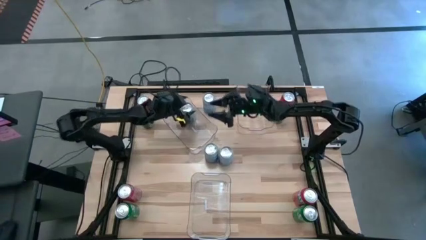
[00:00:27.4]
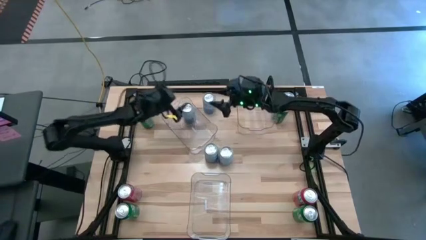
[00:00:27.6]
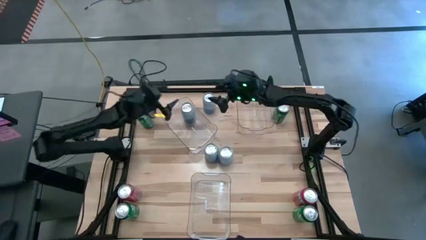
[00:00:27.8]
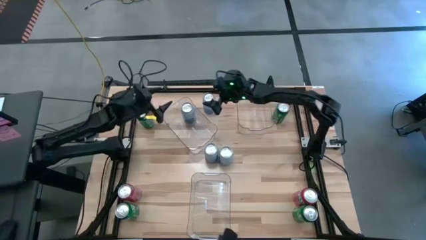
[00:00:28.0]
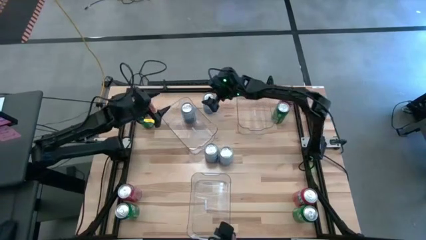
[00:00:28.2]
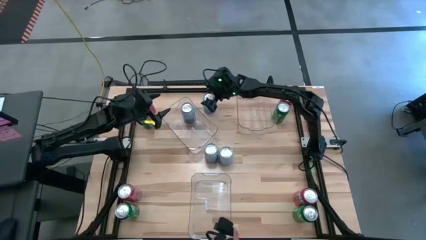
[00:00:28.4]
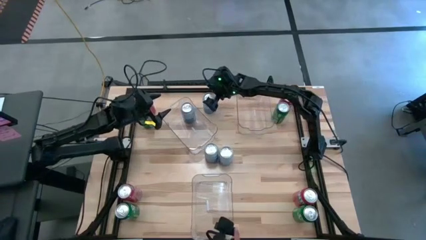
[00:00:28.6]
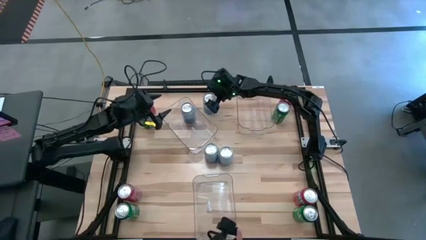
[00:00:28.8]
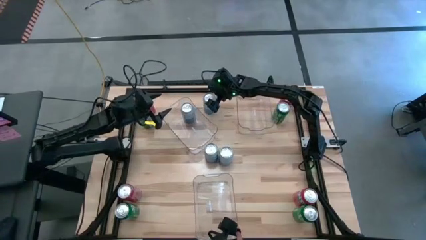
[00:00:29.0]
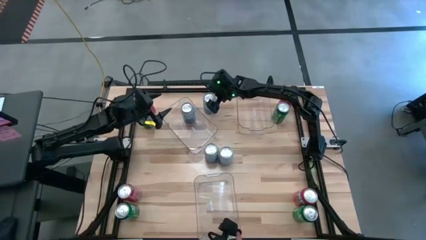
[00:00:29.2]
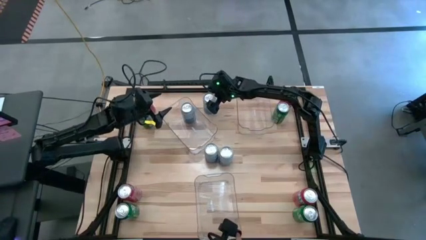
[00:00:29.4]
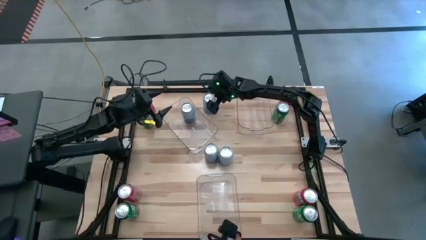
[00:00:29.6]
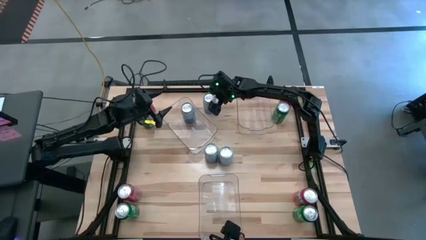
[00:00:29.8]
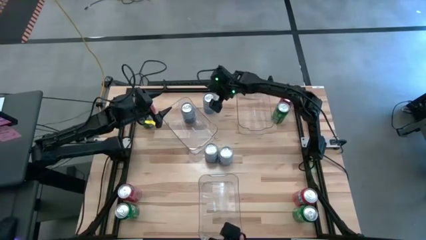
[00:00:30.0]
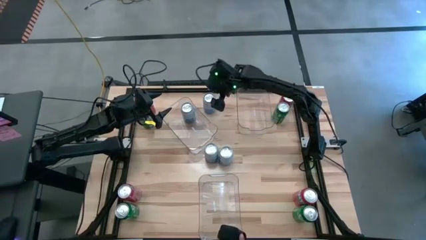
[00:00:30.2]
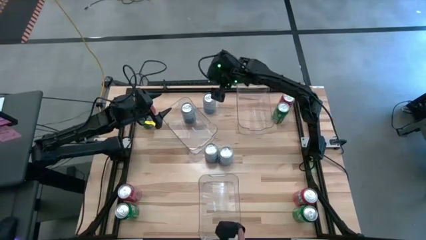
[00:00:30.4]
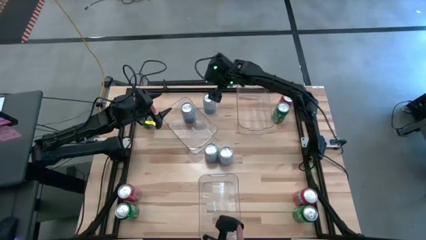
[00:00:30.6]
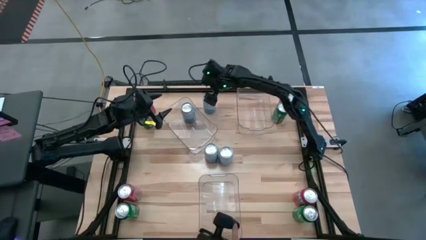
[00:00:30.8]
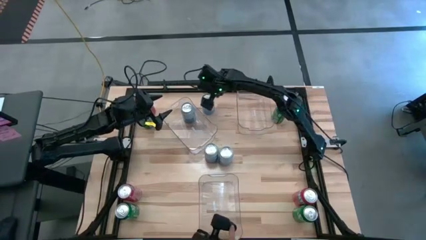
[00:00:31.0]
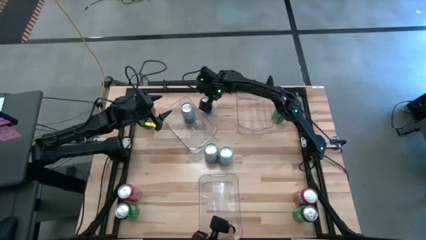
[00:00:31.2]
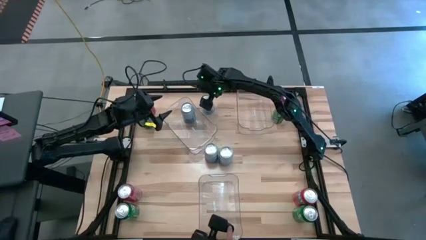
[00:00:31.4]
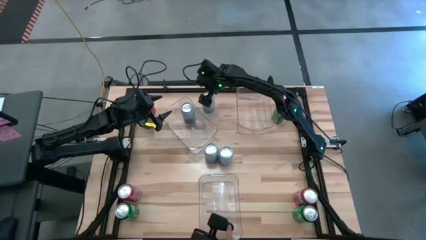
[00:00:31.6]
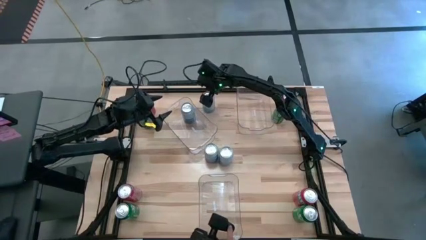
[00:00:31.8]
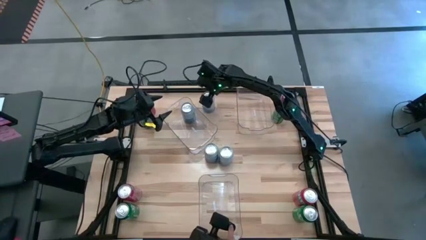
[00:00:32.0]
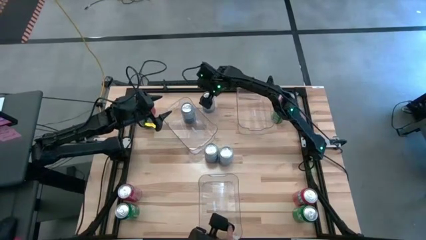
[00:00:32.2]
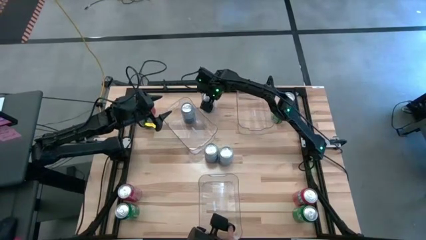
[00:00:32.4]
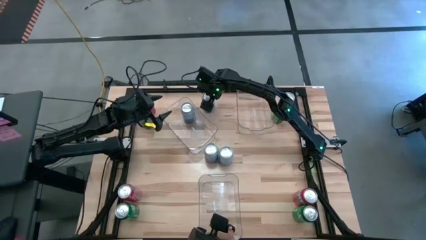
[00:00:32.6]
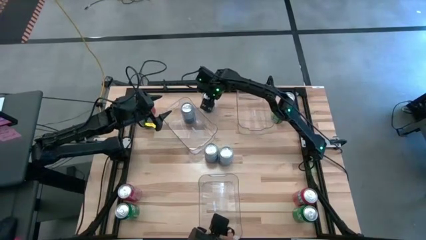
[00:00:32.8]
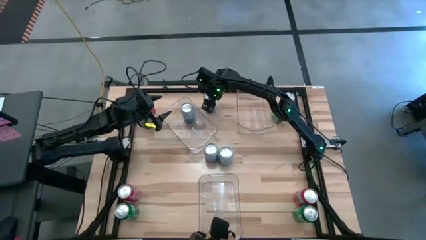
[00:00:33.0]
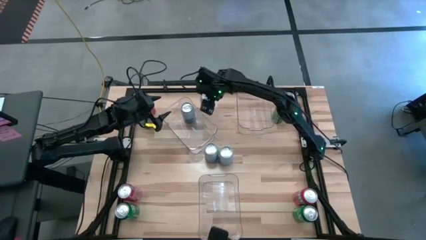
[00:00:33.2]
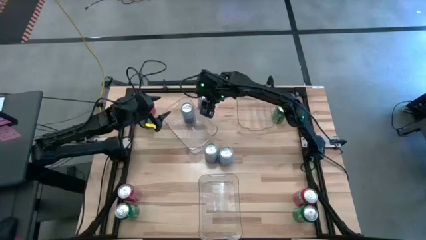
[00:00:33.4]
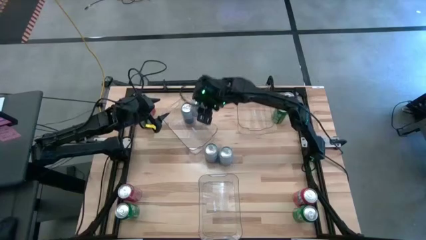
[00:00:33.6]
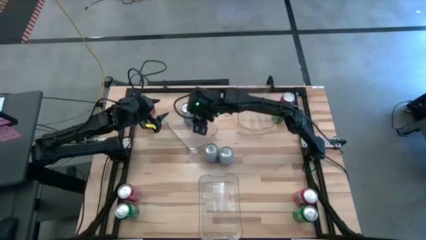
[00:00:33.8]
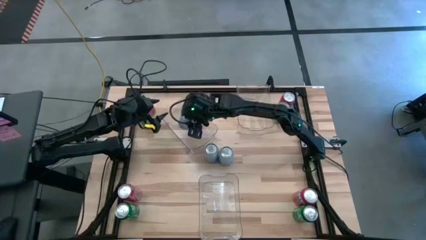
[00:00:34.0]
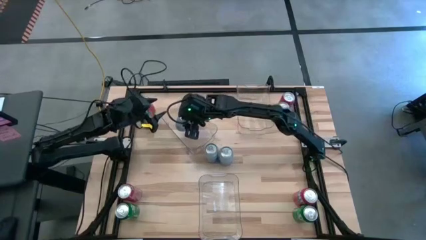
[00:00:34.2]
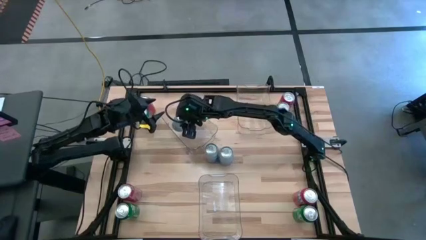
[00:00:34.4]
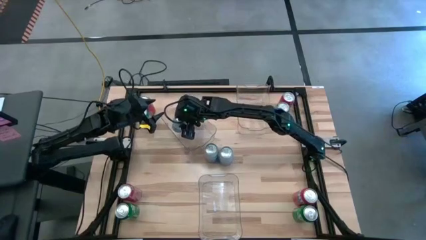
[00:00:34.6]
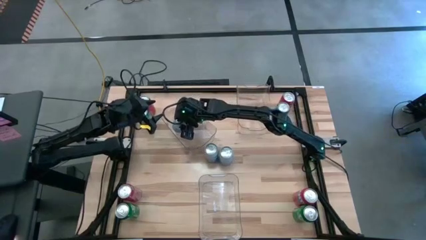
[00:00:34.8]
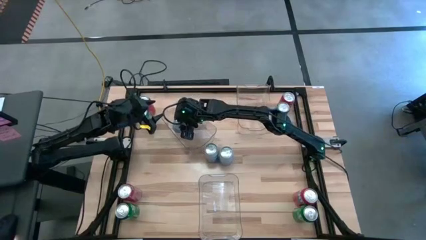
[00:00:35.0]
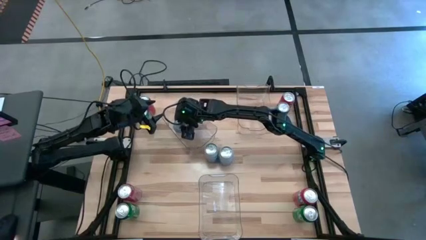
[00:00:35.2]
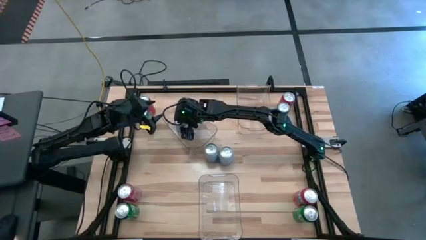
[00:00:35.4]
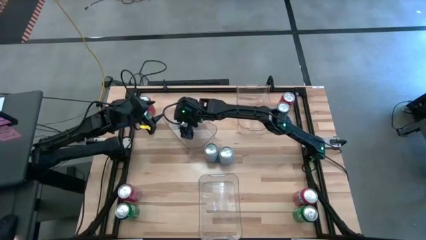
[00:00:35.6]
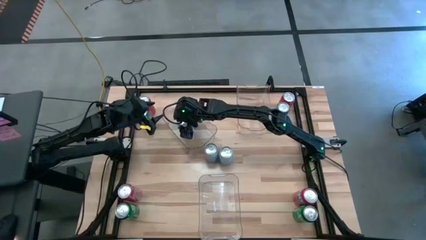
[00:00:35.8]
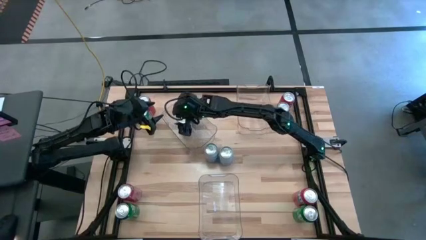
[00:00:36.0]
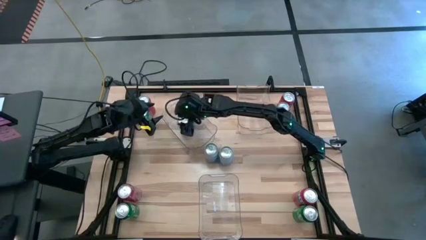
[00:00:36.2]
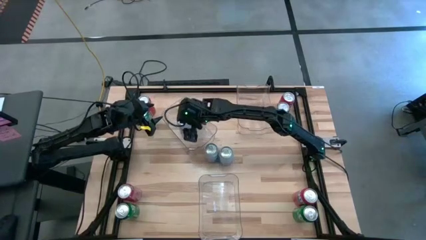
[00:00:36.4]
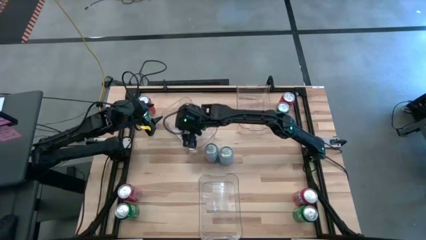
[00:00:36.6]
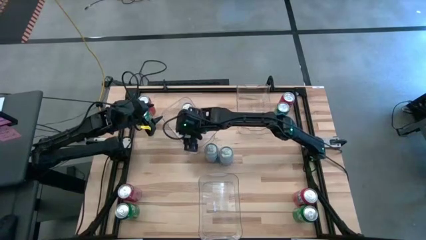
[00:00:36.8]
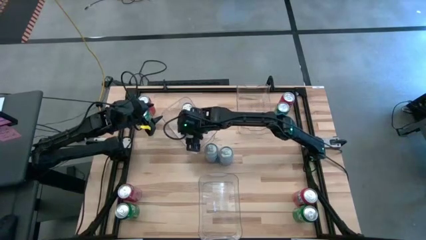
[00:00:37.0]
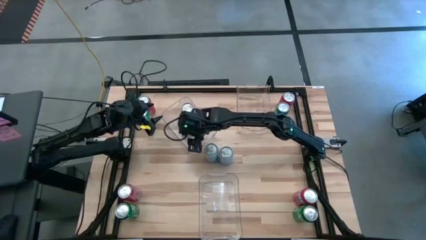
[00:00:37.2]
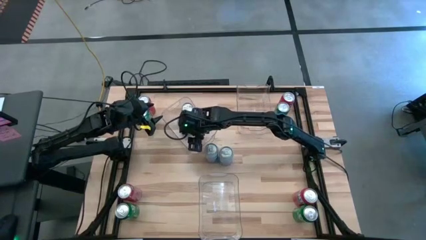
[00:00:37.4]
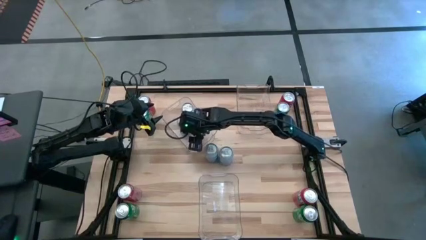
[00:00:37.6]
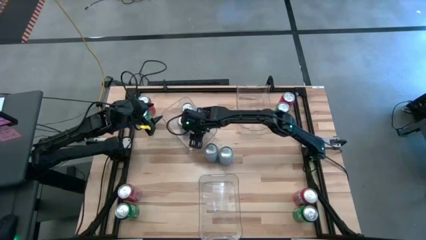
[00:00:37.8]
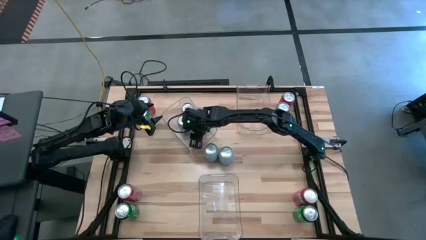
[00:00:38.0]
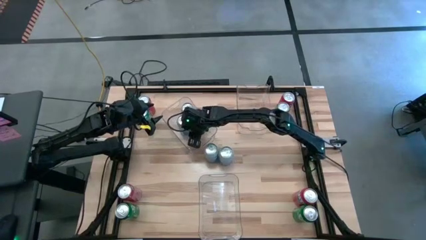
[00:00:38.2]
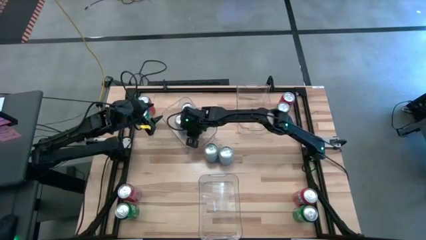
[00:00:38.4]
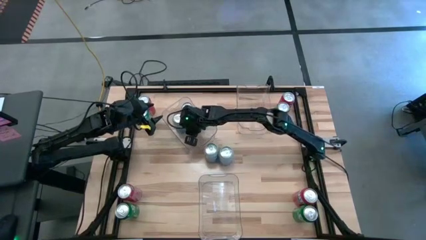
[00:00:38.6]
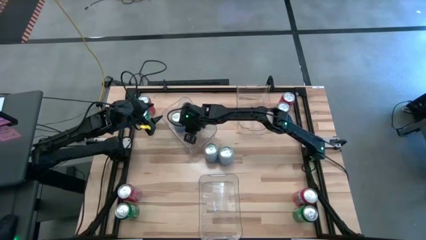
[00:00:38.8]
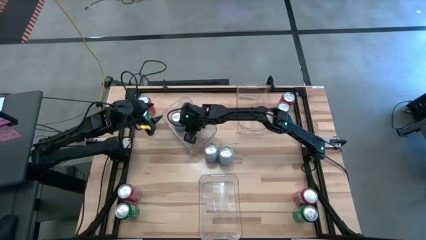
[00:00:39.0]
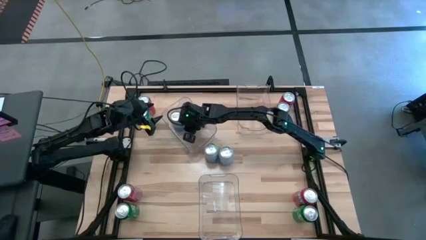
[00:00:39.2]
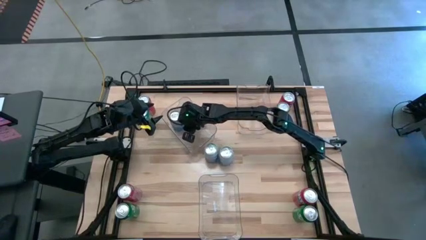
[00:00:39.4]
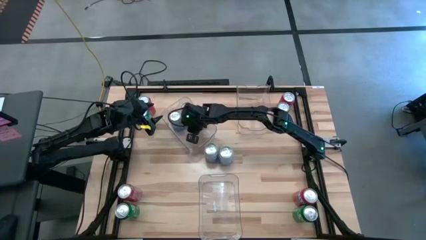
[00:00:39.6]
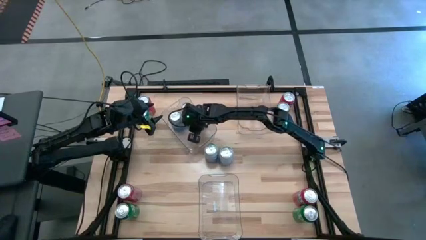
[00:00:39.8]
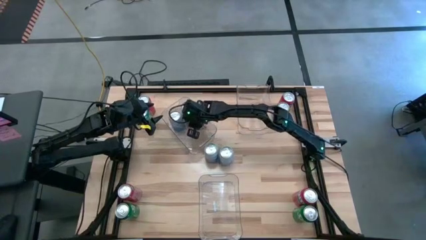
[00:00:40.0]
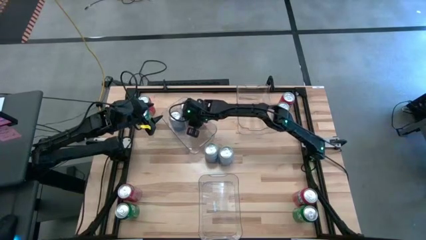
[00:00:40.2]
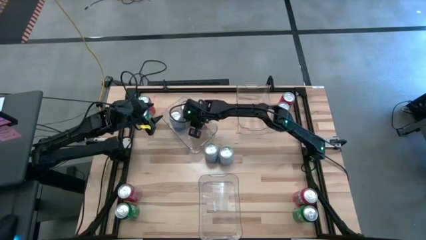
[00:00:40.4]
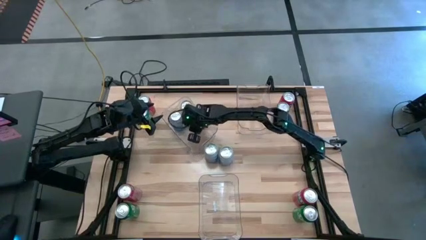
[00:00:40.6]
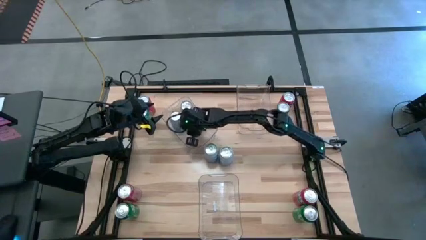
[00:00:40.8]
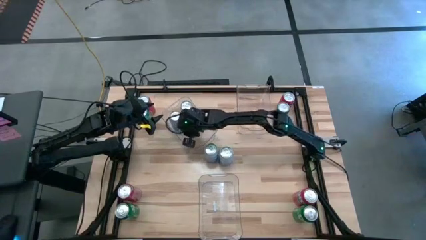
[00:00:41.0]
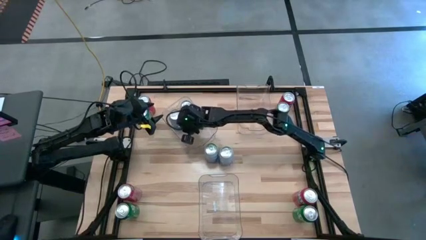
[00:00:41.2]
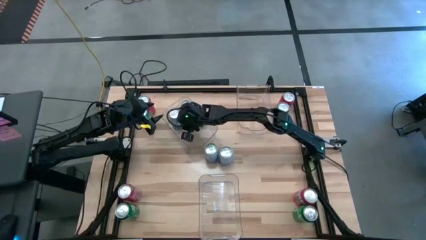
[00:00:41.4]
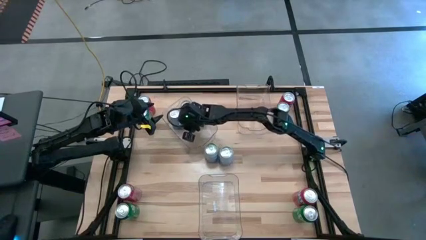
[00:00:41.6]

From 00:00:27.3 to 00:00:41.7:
Task: Sort soda cans
Put the top blue-white soda can into the top left transparent bin
